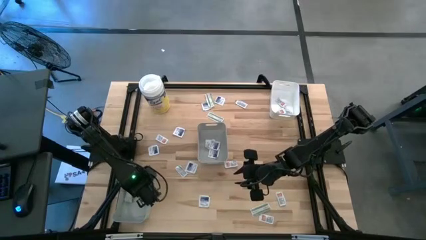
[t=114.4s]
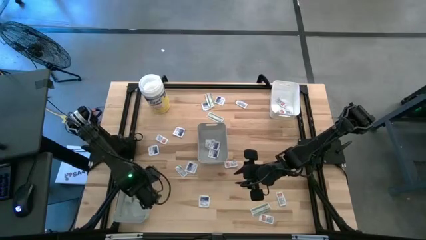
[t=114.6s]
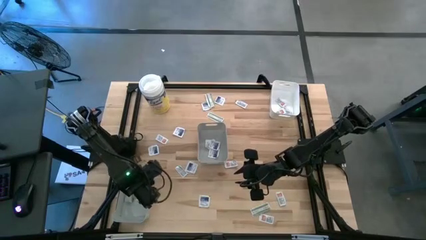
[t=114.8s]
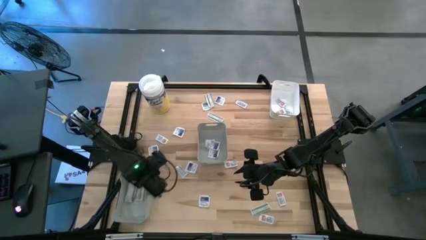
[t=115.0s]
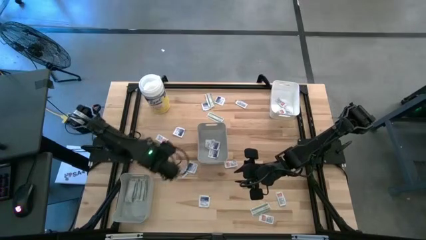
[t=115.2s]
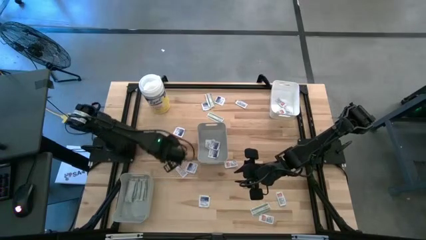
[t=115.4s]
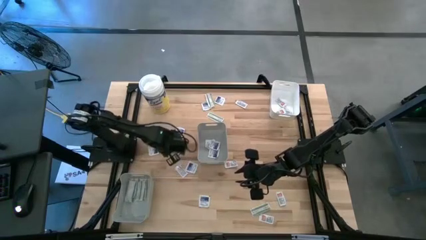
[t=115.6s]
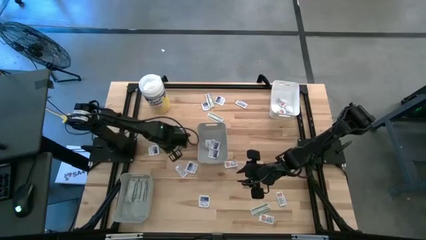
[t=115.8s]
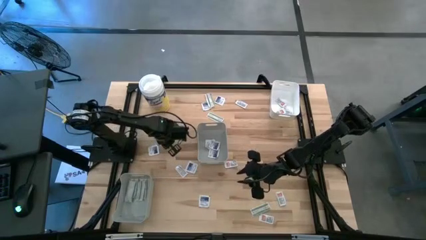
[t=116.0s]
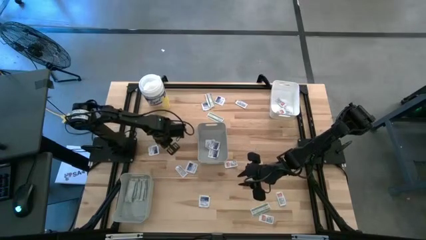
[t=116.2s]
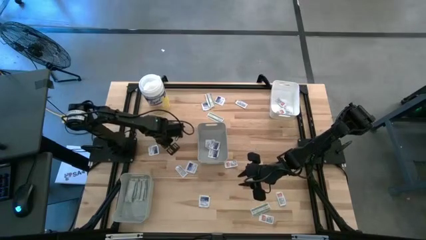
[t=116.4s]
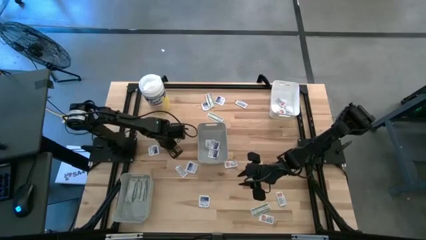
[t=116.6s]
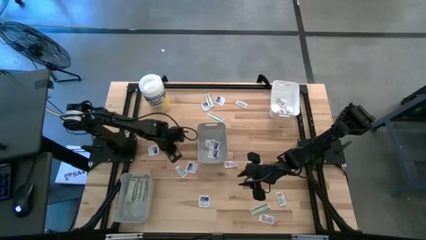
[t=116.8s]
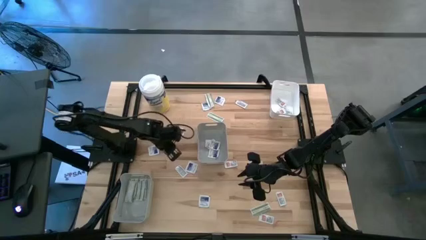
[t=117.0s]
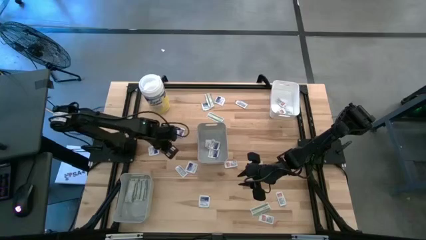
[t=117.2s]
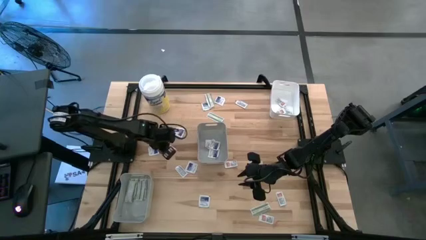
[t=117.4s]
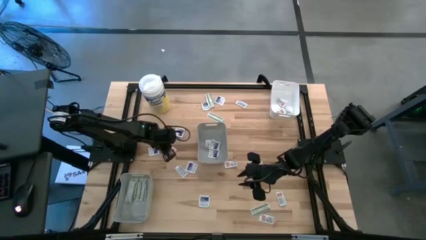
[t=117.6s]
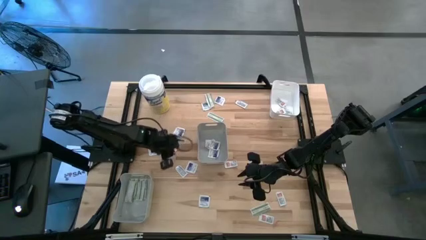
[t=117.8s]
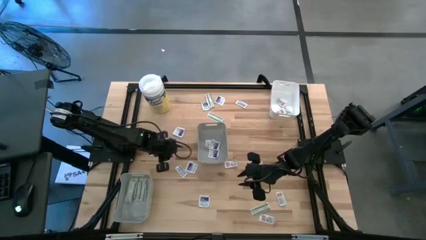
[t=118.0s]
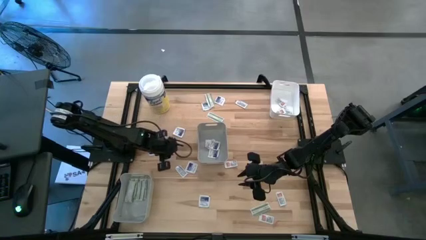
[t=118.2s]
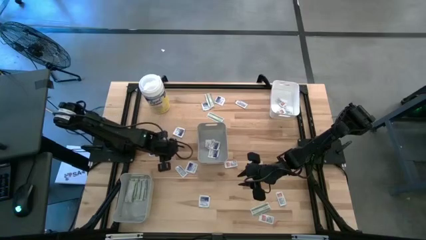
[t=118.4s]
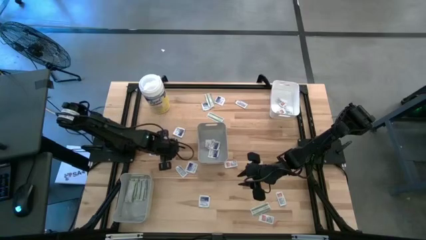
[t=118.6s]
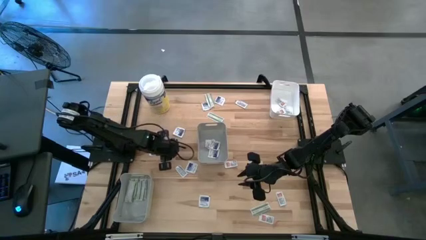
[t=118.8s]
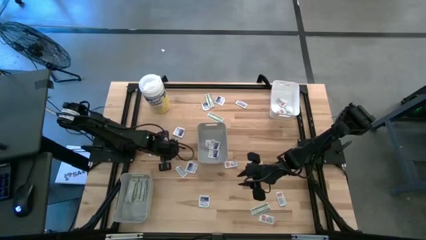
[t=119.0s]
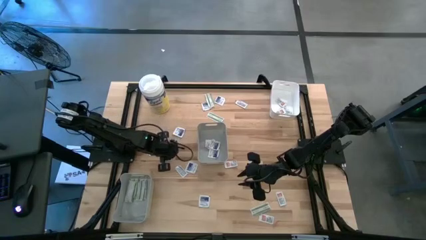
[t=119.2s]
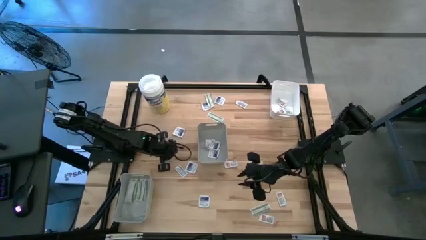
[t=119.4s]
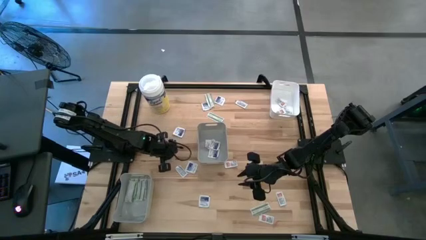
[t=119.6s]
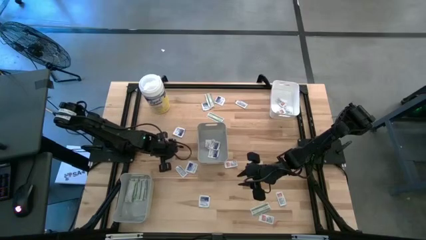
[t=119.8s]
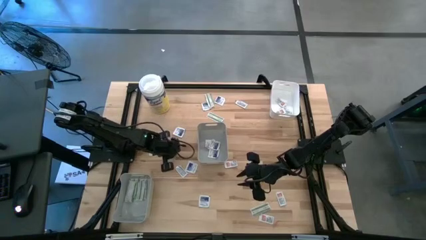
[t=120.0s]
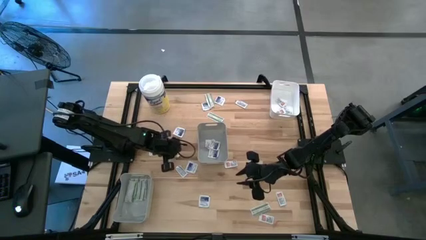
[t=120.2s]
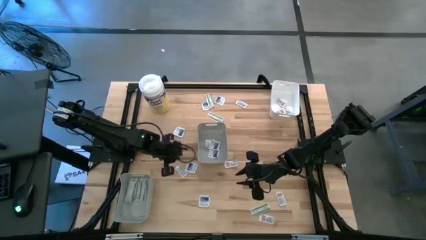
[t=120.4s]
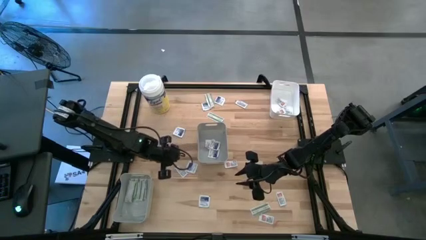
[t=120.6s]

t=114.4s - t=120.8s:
Task: Pick & Place First Aid Supplies
Put the orange pad into the white bin

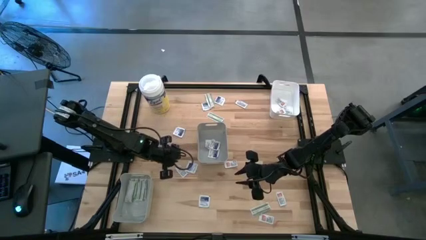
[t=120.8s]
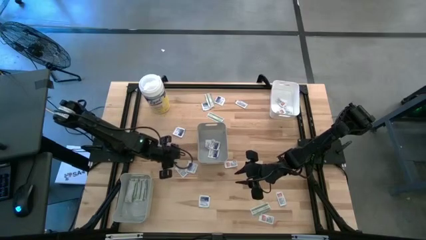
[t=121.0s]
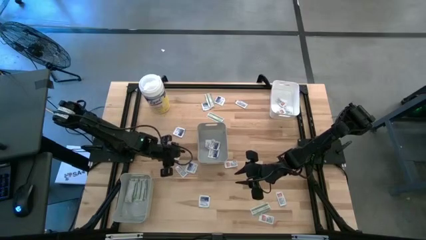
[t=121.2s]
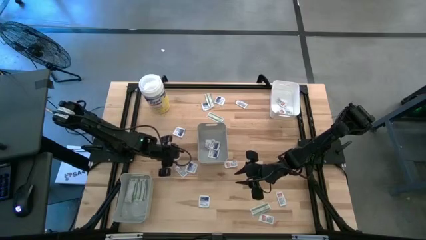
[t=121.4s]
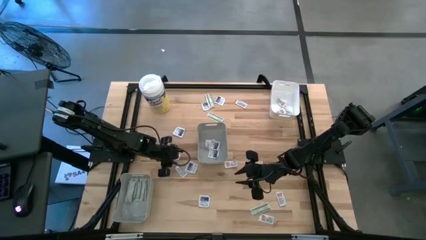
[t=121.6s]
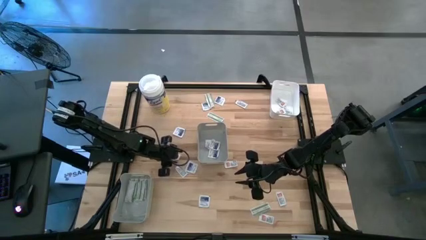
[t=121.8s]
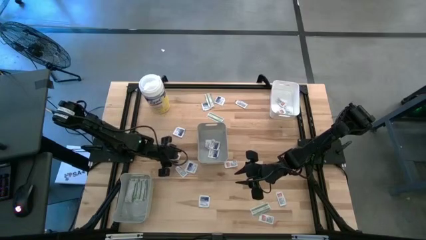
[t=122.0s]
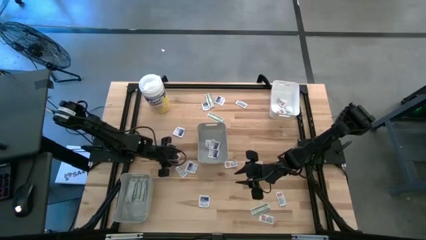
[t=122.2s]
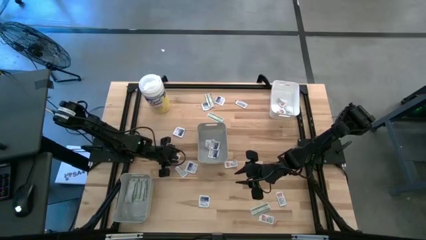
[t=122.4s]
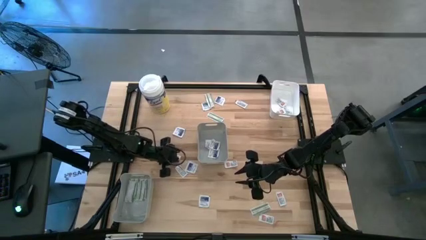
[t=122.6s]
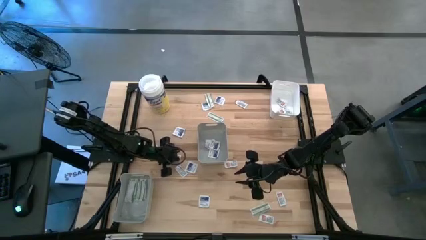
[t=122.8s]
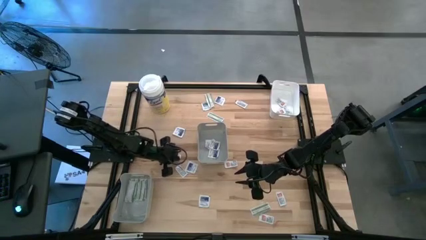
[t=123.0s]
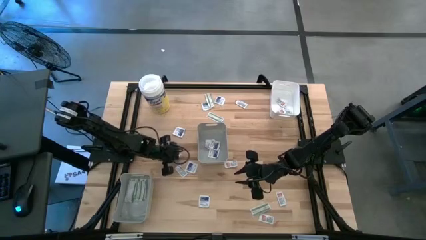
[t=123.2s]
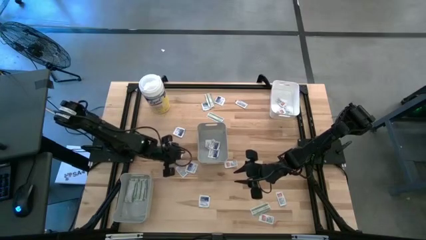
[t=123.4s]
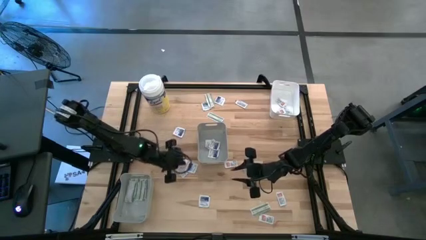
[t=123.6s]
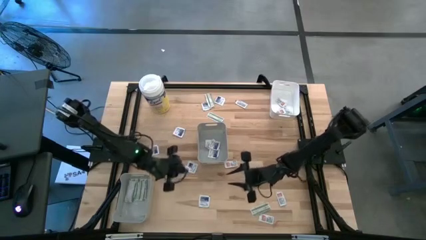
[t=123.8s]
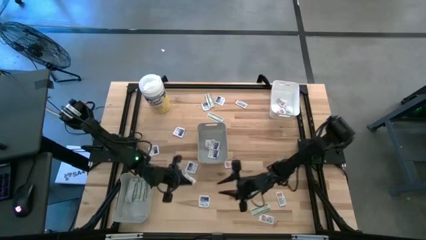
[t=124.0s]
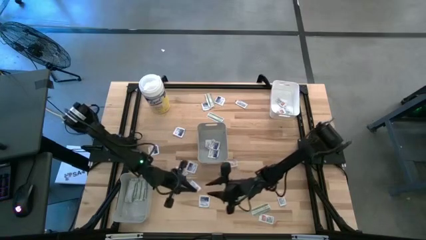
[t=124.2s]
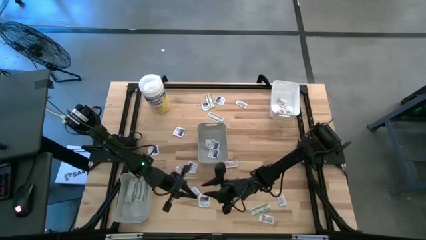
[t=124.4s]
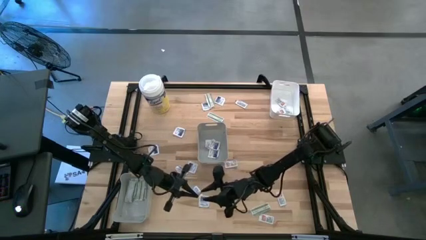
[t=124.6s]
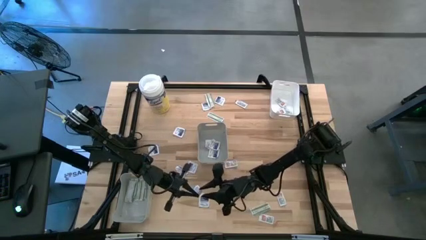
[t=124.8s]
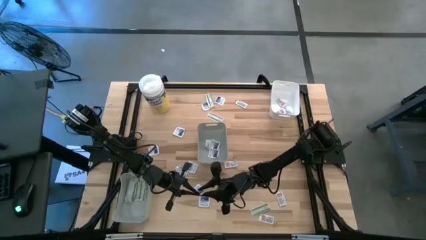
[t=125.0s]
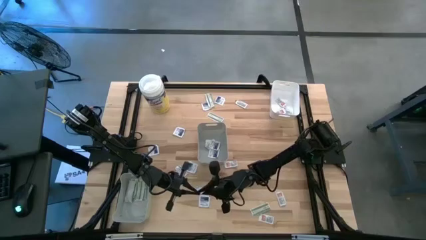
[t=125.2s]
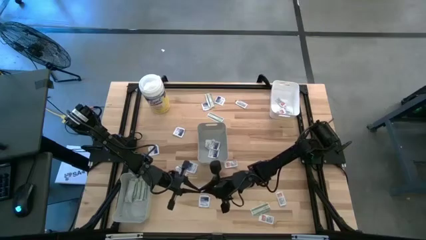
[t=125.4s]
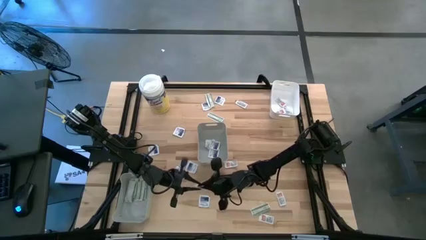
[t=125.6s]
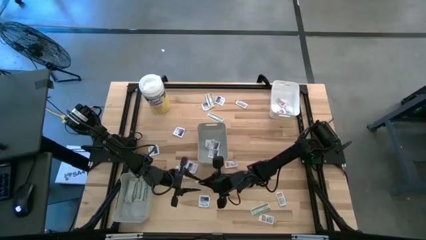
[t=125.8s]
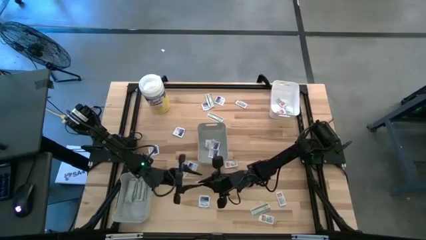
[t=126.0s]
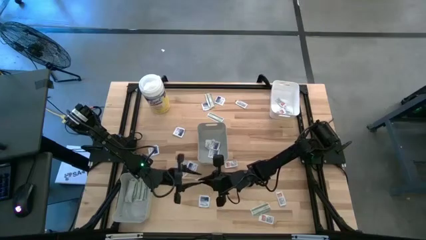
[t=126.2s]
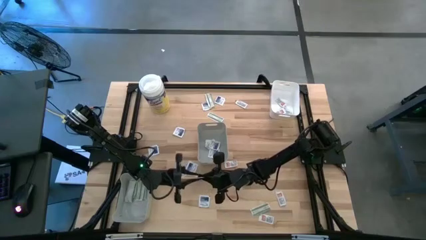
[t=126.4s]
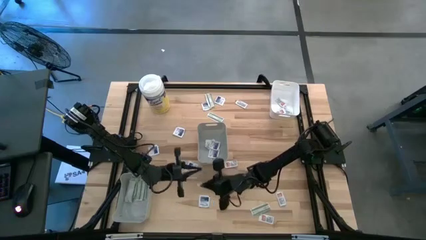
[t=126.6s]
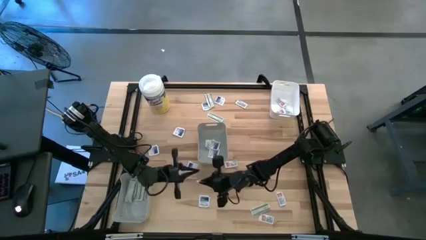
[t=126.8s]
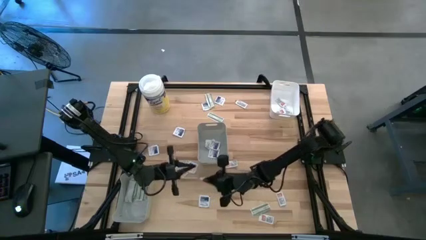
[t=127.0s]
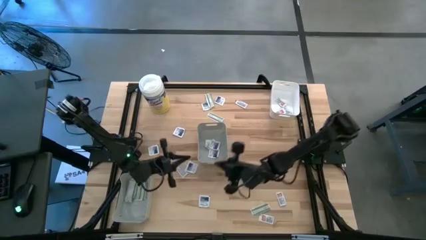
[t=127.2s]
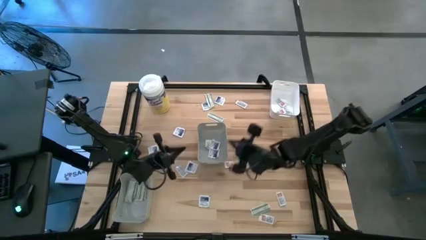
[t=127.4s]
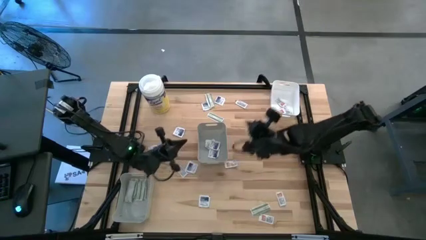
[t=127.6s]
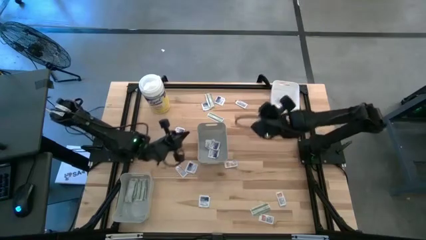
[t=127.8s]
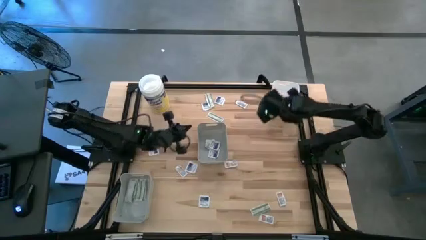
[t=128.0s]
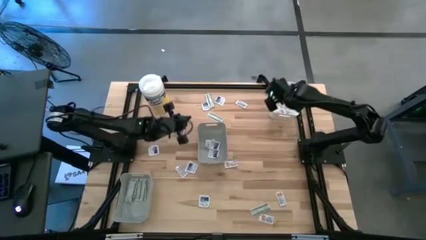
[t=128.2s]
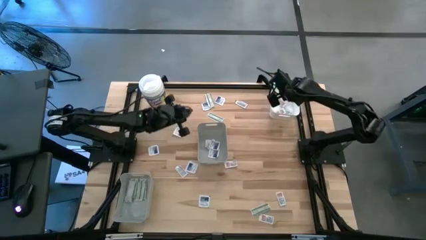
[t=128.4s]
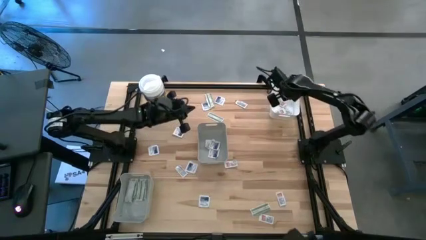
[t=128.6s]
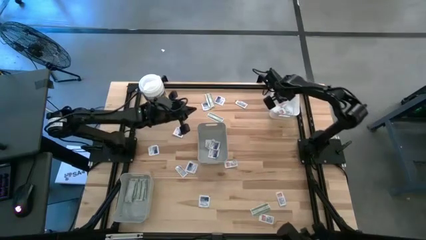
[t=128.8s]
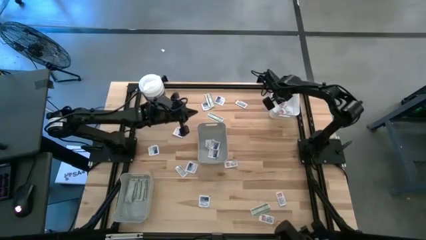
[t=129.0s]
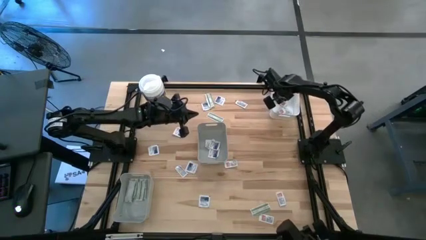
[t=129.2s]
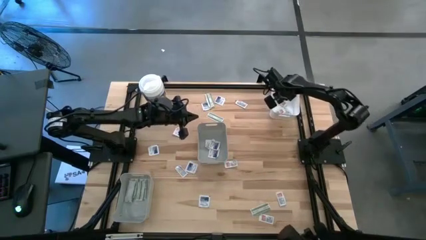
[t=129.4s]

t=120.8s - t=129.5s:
Put the orange pad into the white bin
